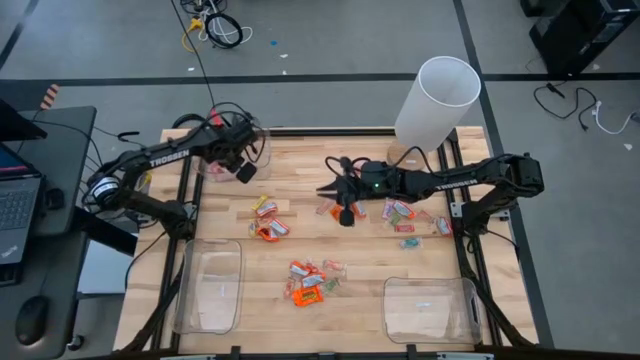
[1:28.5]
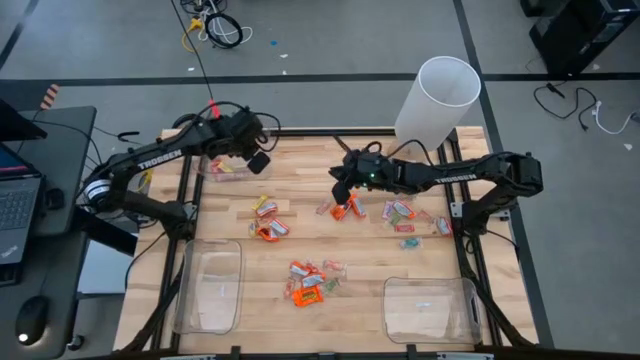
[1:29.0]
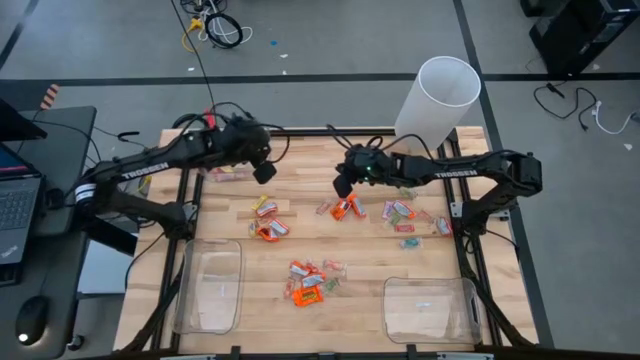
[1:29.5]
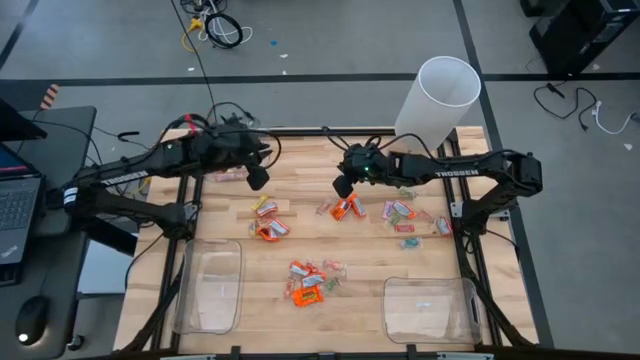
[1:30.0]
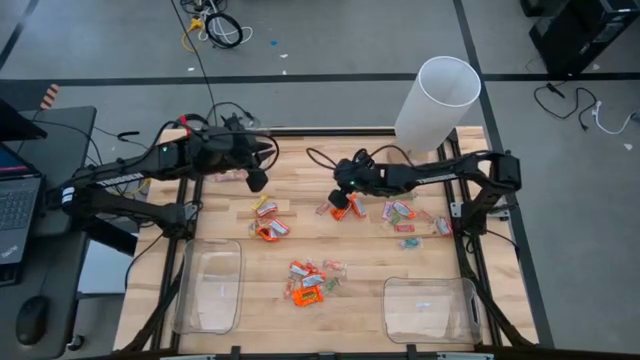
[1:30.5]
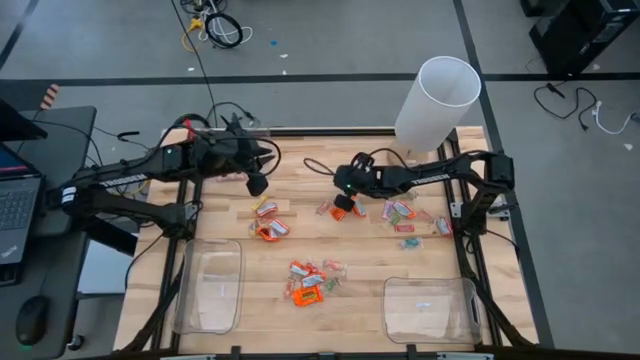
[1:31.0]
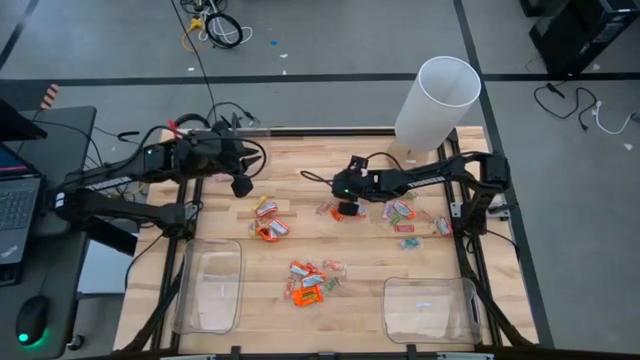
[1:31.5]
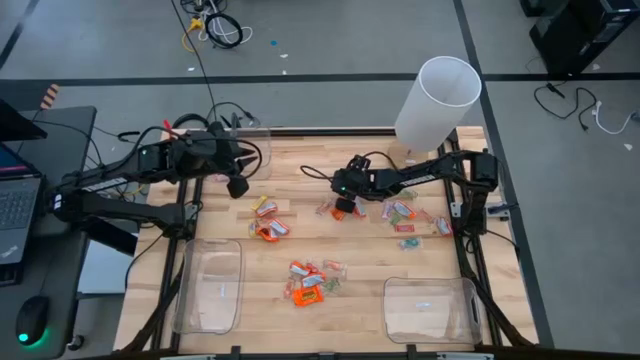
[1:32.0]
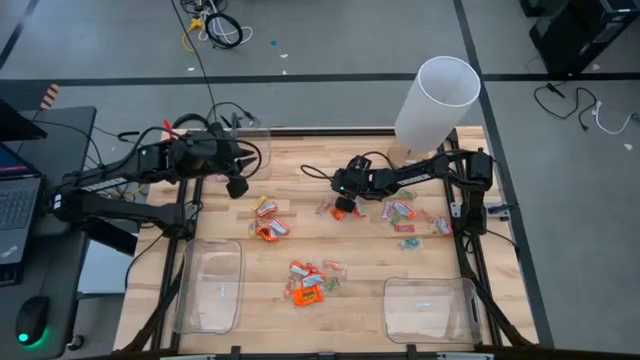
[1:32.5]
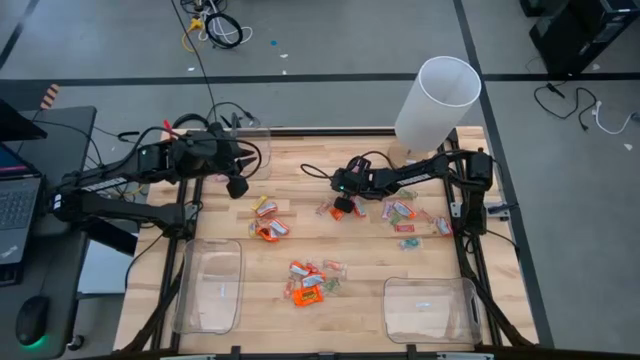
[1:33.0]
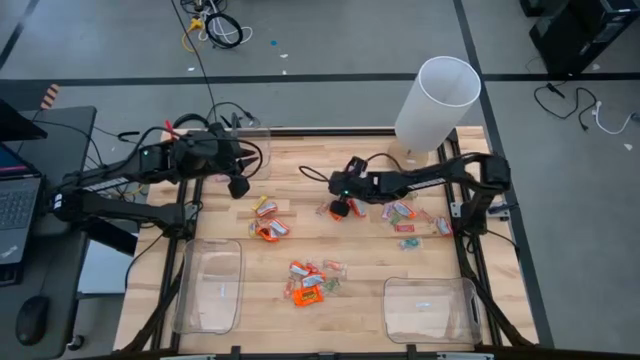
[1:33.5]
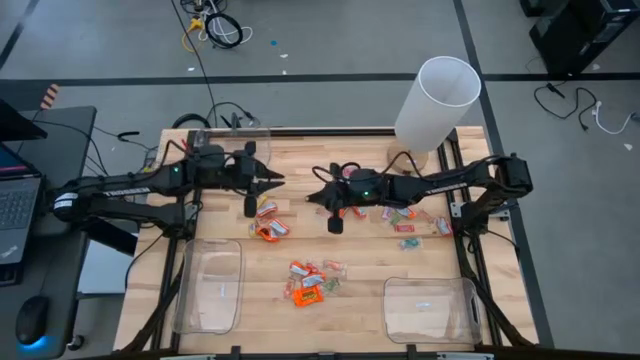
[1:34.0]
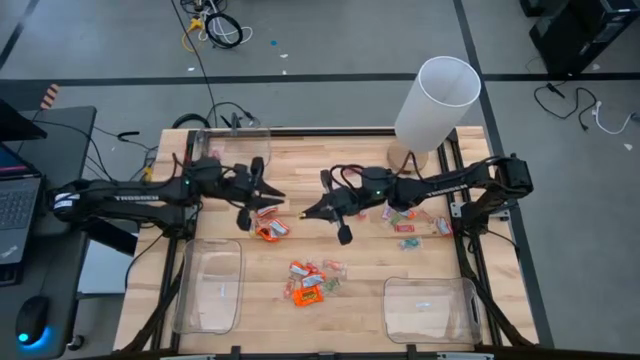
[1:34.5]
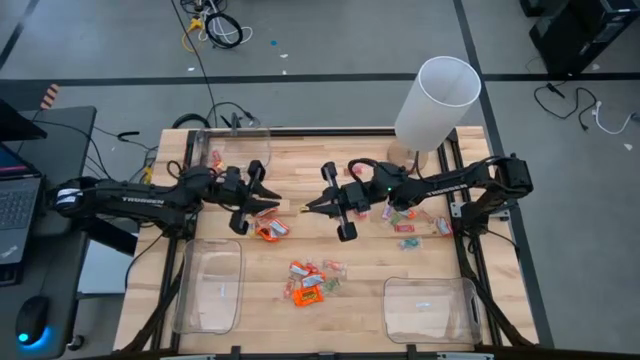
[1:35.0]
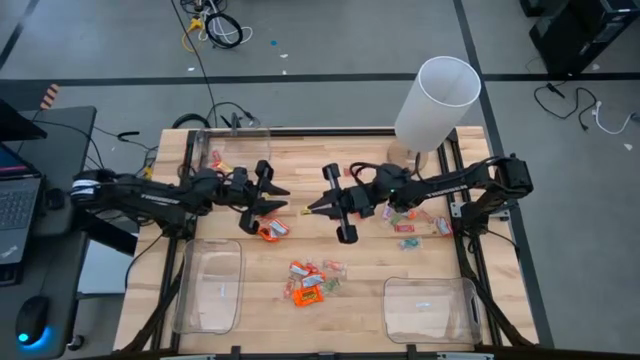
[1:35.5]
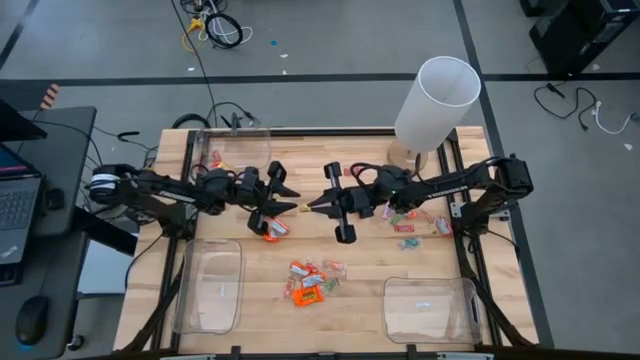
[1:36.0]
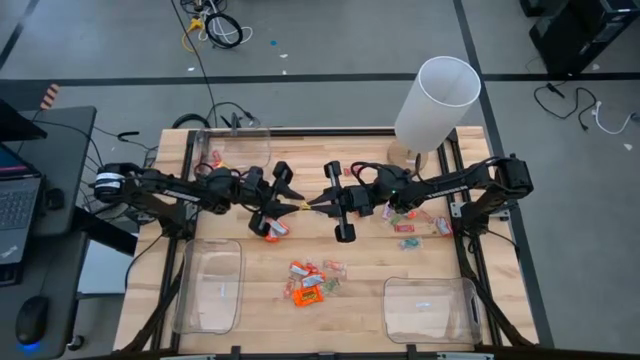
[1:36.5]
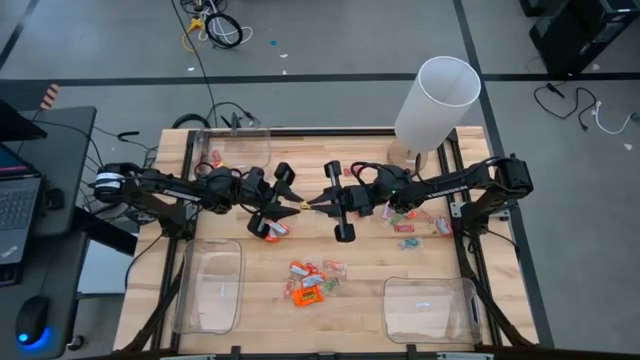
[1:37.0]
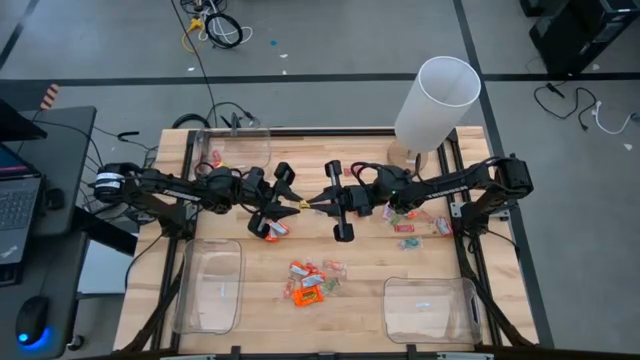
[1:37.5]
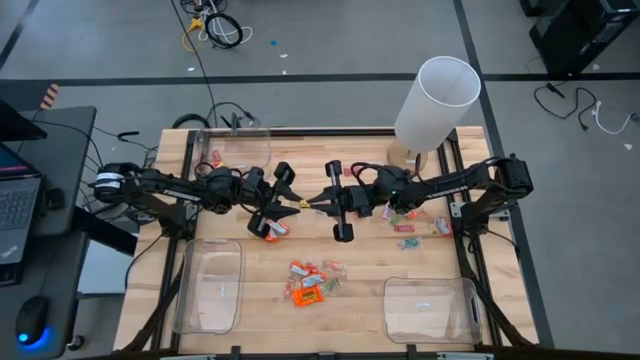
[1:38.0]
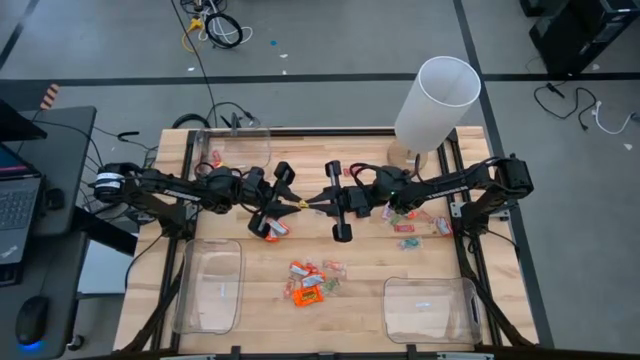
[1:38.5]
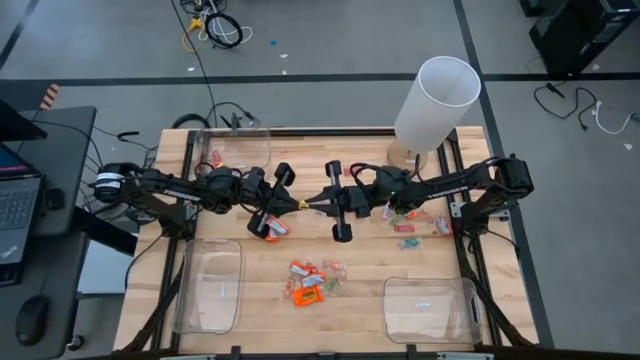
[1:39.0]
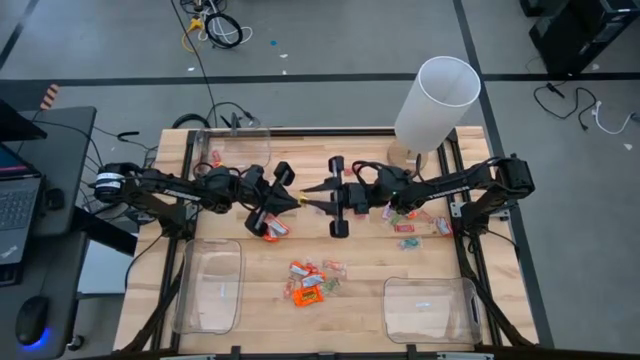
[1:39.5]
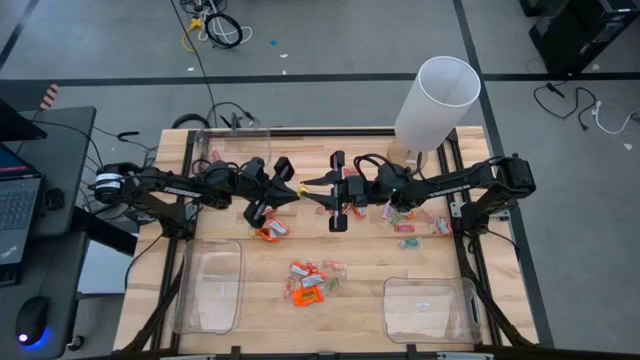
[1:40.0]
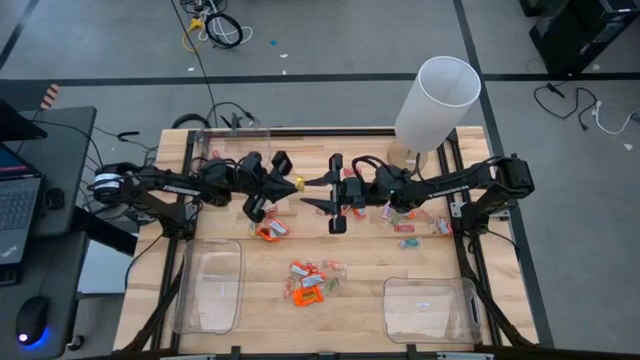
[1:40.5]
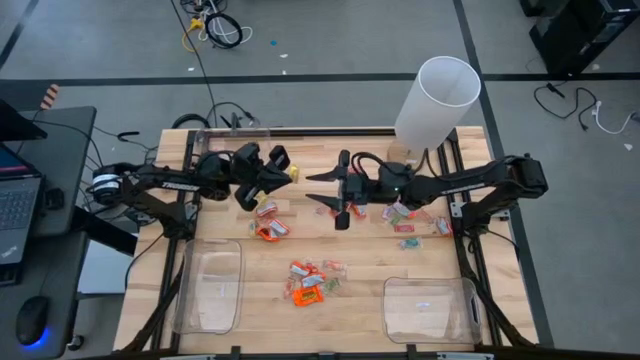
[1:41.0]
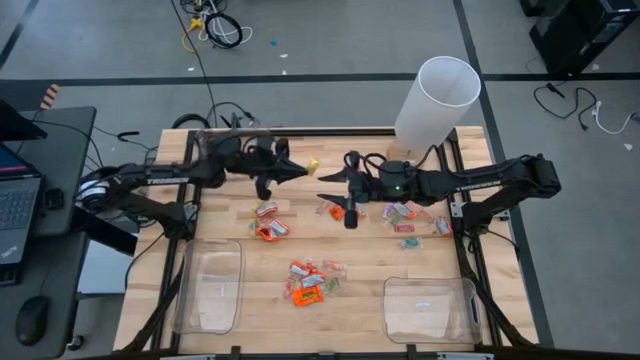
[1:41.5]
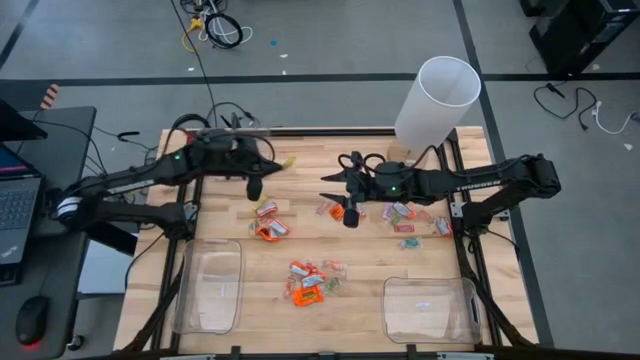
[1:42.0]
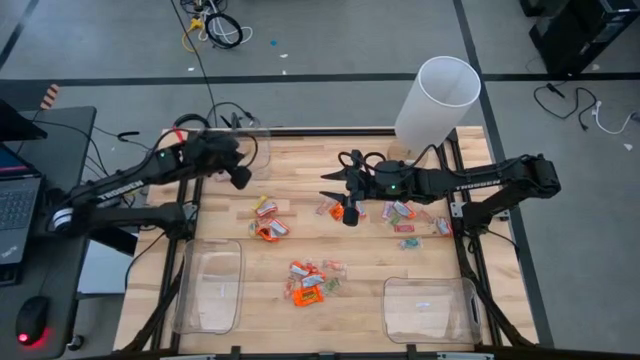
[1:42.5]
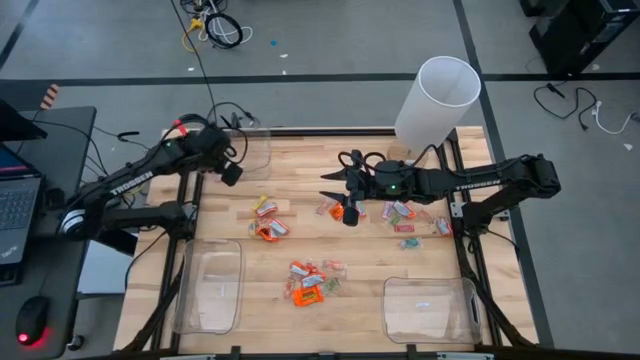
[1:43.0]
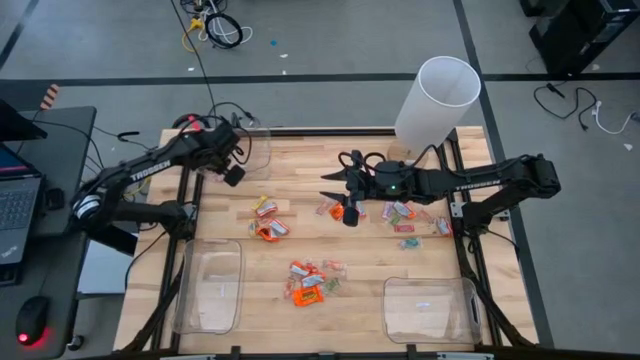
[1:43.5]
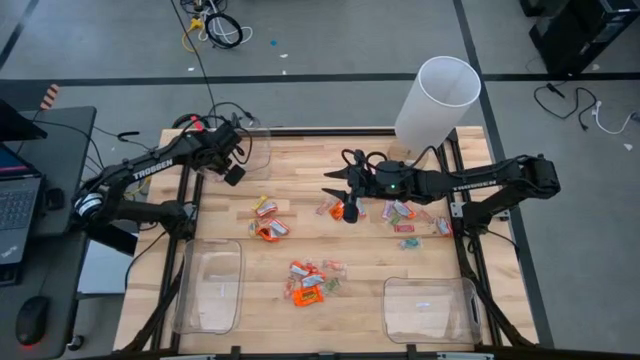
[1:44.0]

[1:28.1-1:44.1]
Task: Sort candy
Put the yellow candy into the top left transparent bin

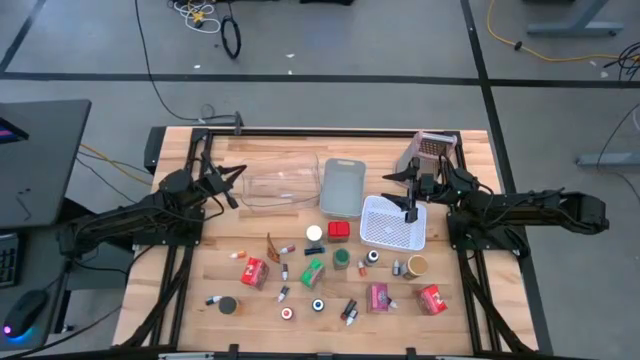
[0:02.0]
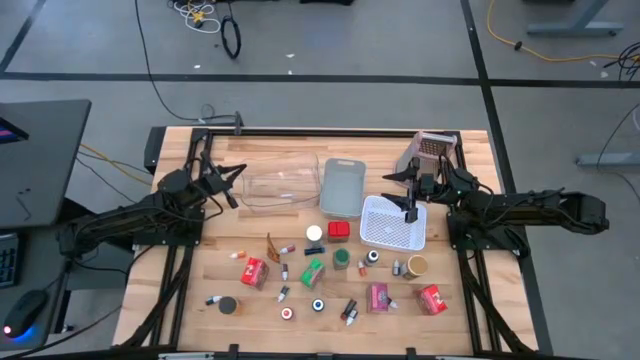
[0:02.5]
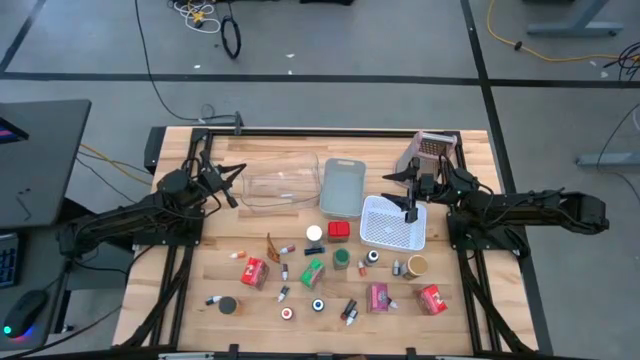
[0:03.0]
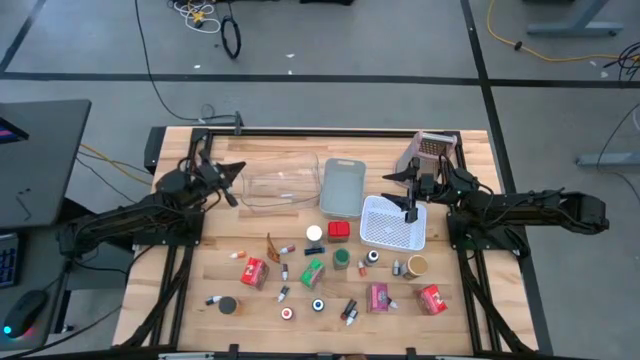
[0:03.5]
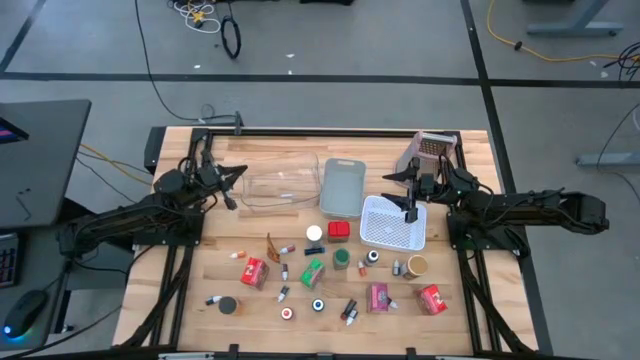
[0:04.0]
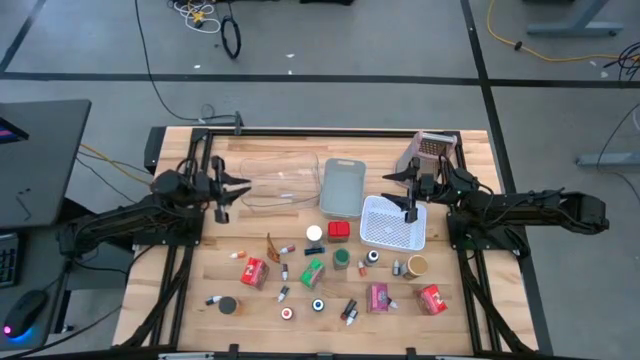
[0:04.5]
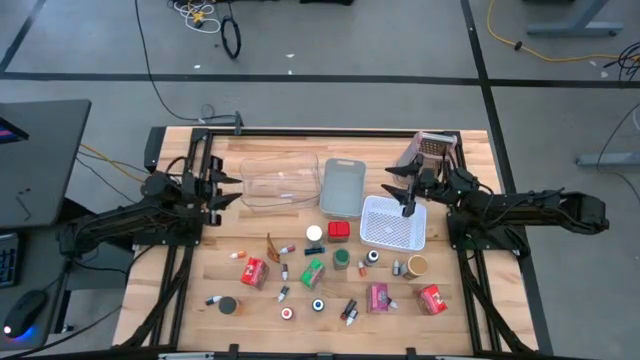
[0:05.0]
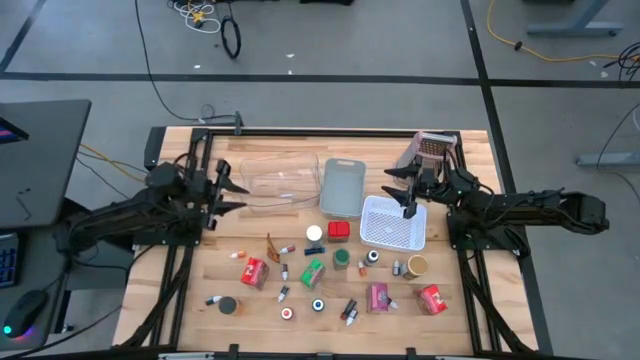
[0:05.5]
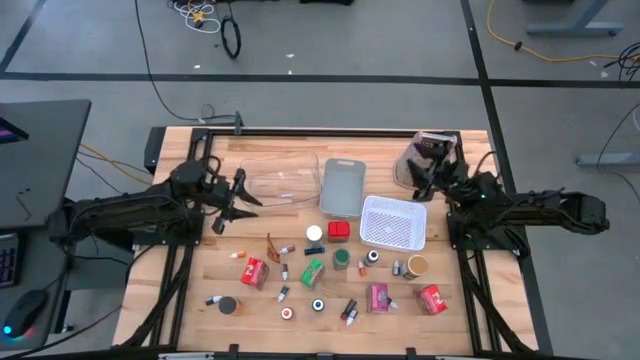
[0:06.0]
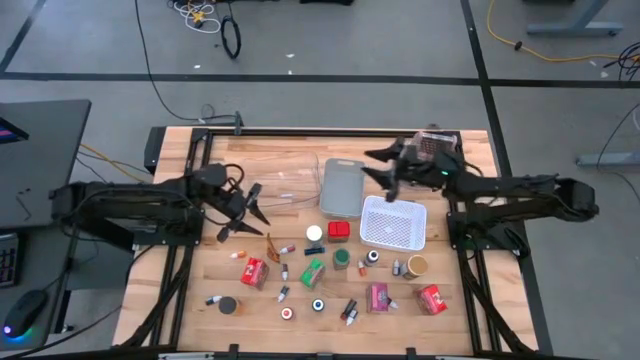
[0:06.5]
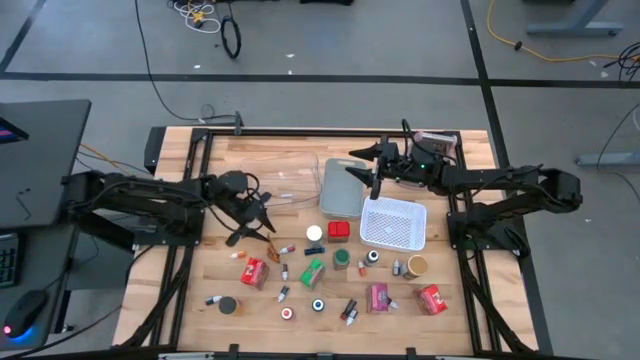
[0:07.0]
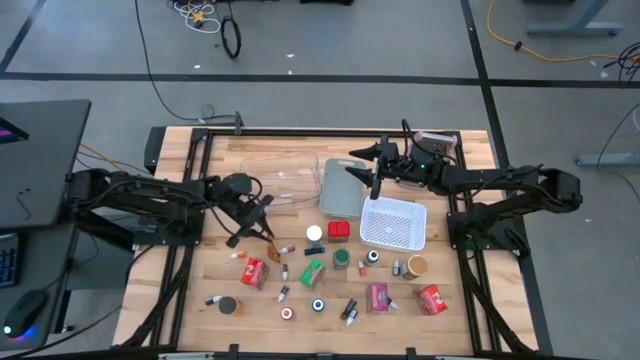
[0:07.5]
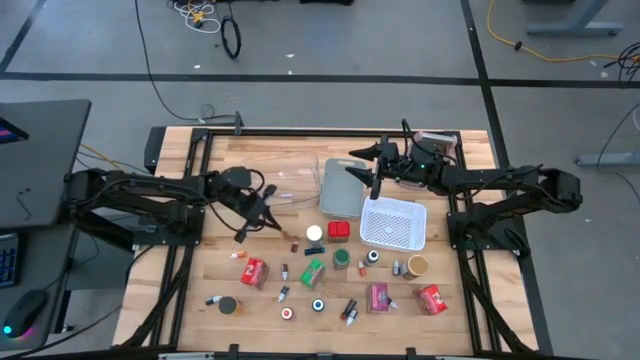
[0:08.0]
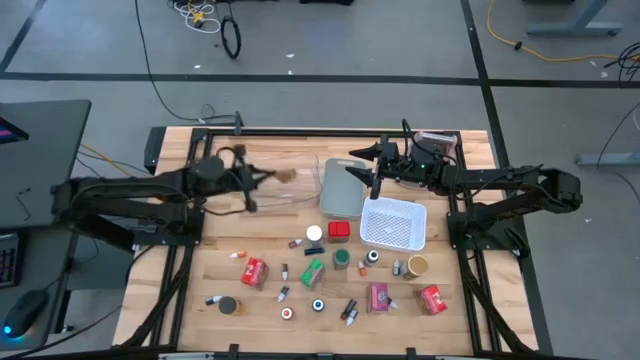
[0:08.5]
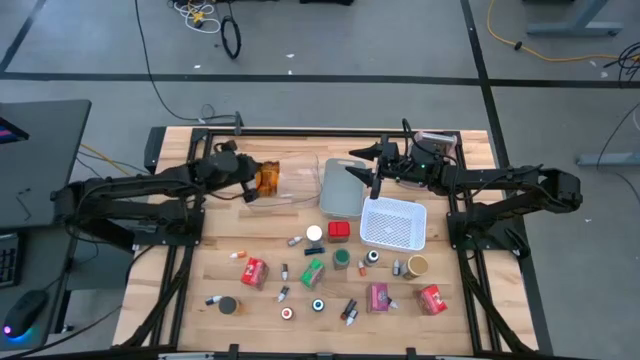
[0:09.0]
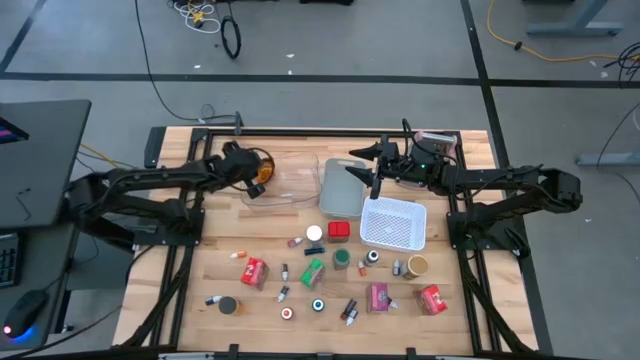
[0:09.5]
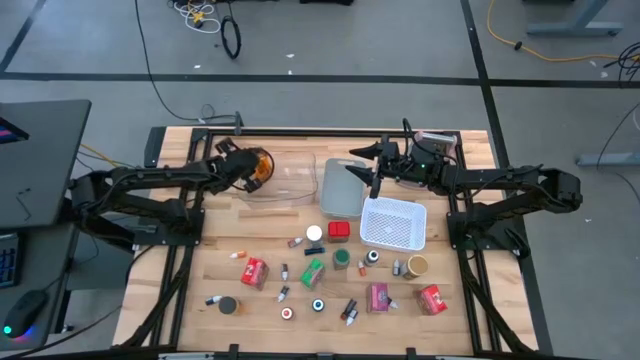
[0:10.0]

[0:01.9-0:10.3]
Task: Pick & Place Kitchen Items
Put the orange seasoning bag into the transparent bin
